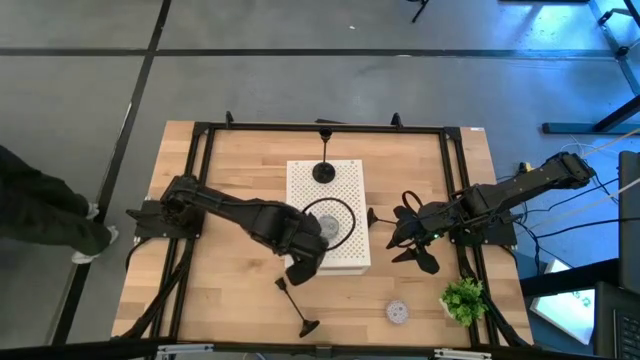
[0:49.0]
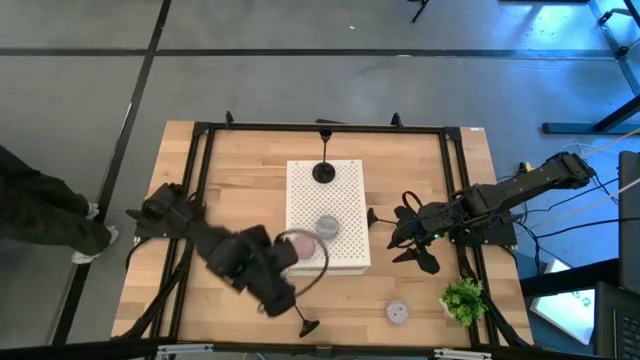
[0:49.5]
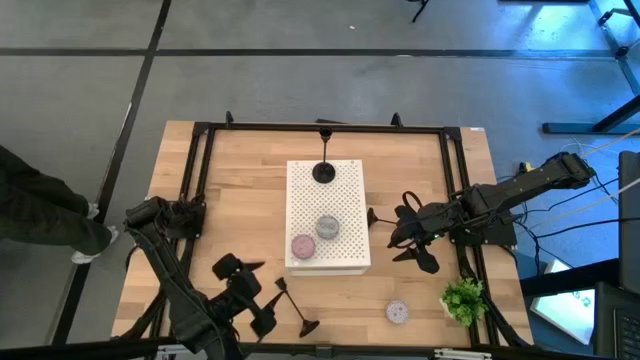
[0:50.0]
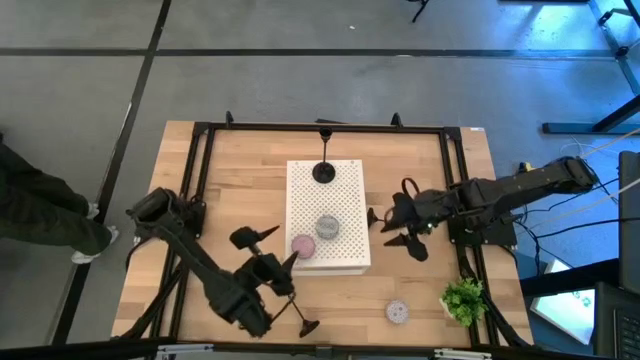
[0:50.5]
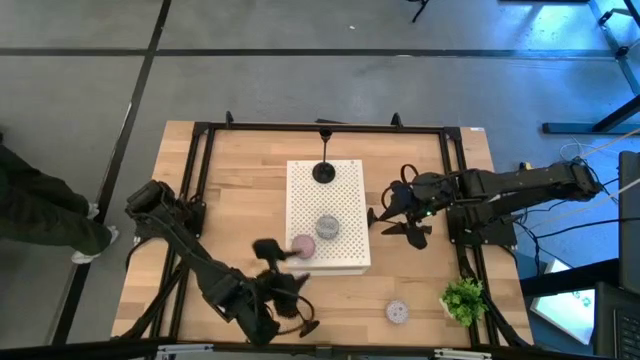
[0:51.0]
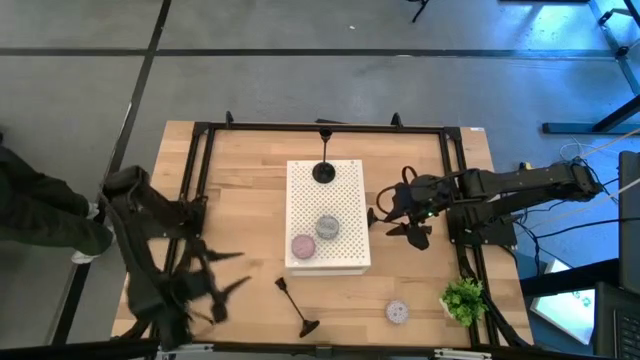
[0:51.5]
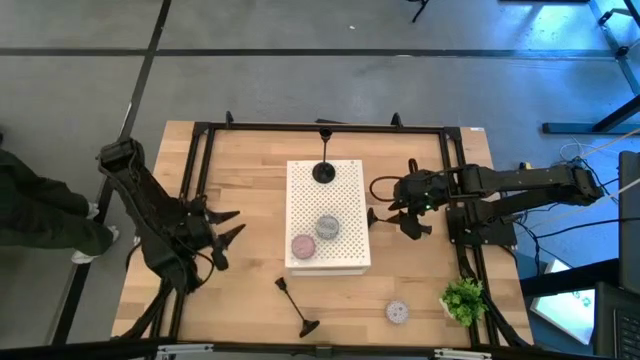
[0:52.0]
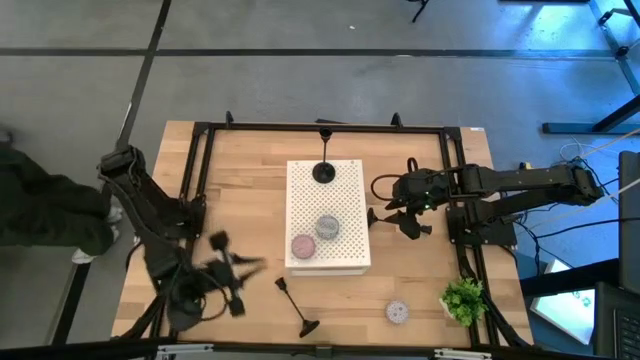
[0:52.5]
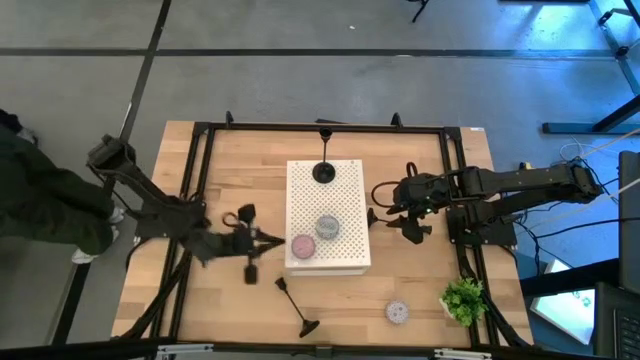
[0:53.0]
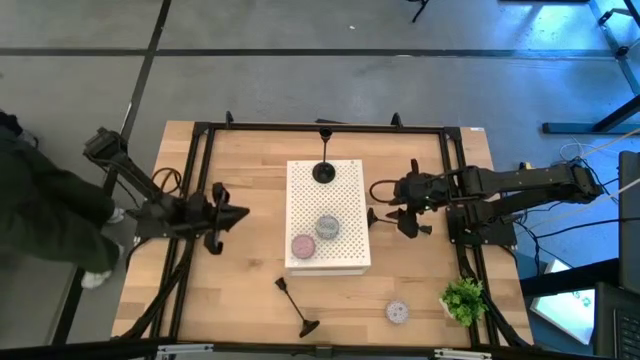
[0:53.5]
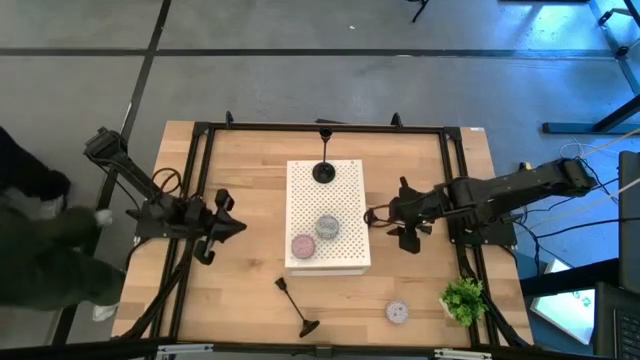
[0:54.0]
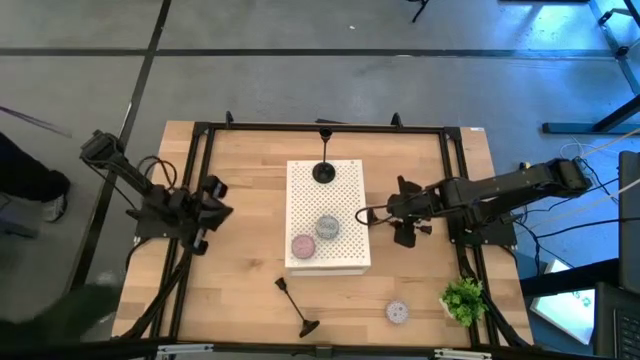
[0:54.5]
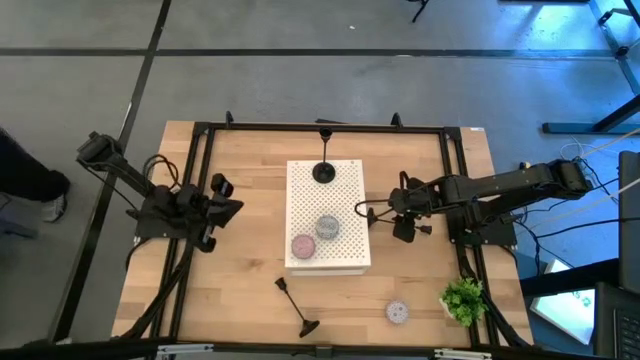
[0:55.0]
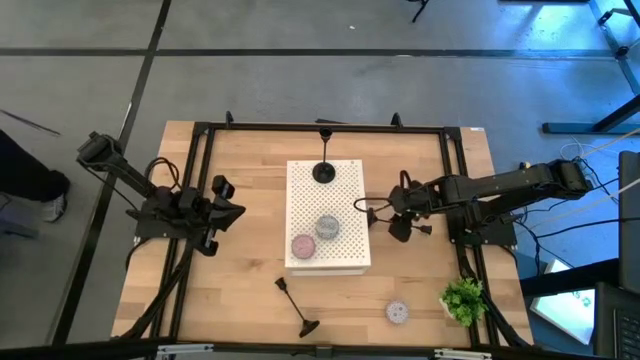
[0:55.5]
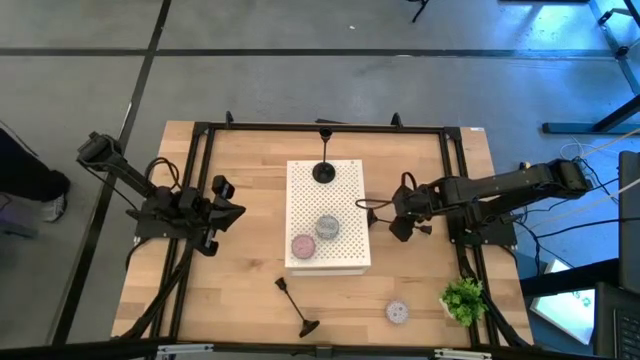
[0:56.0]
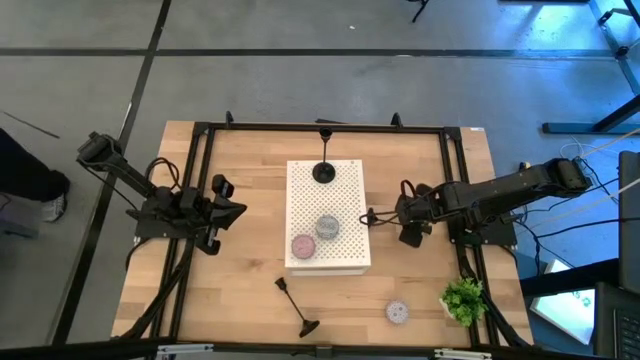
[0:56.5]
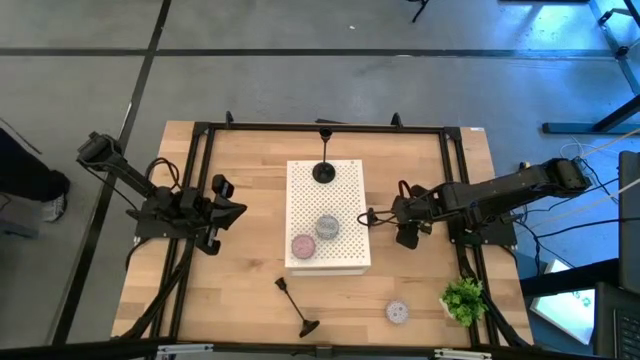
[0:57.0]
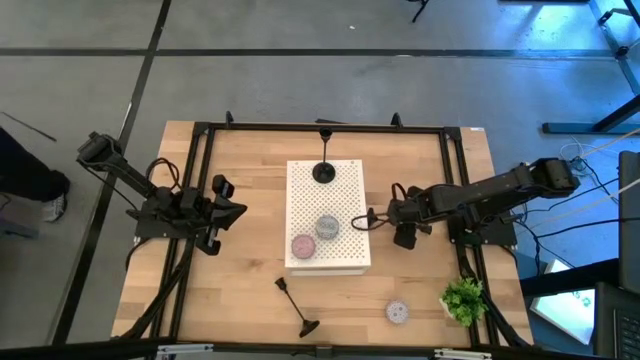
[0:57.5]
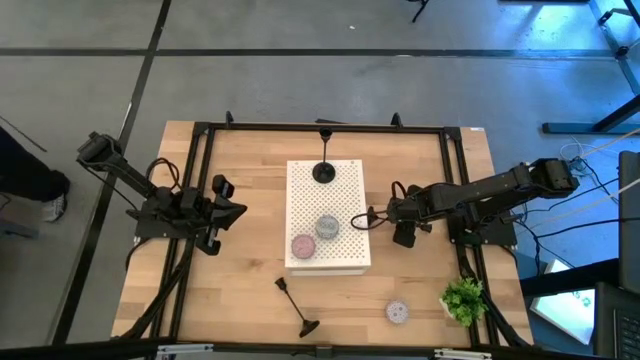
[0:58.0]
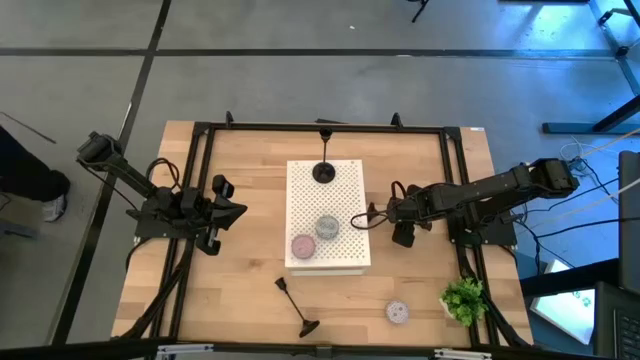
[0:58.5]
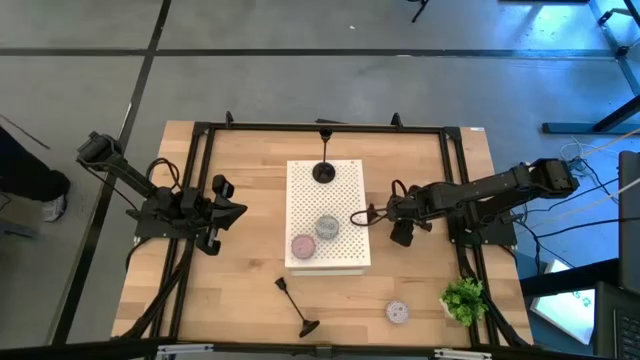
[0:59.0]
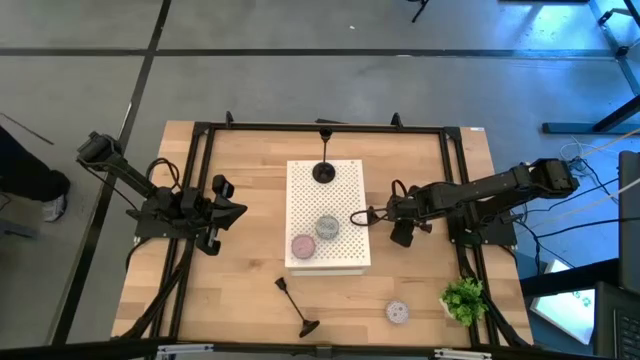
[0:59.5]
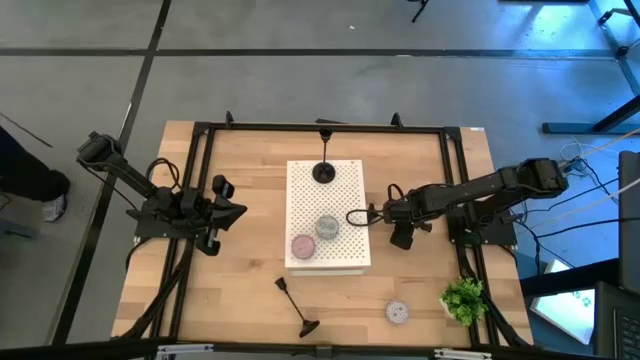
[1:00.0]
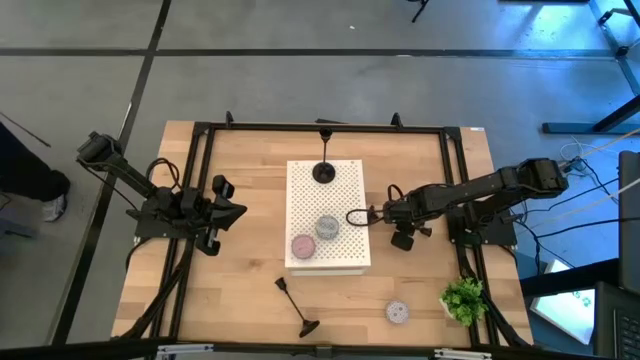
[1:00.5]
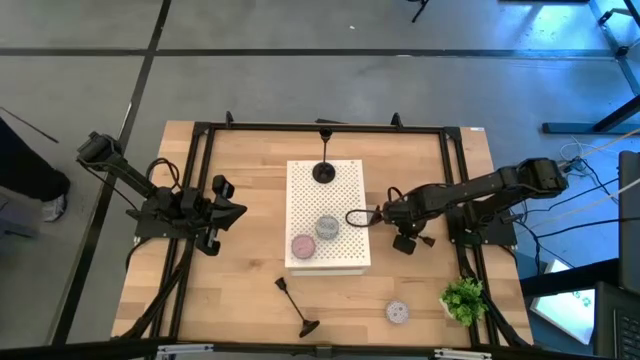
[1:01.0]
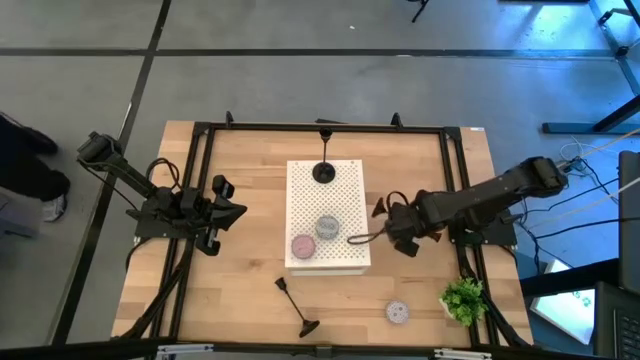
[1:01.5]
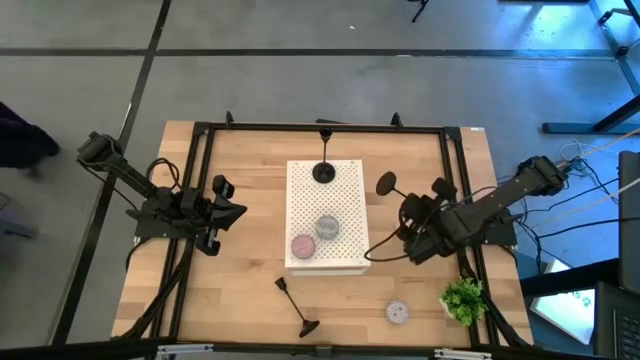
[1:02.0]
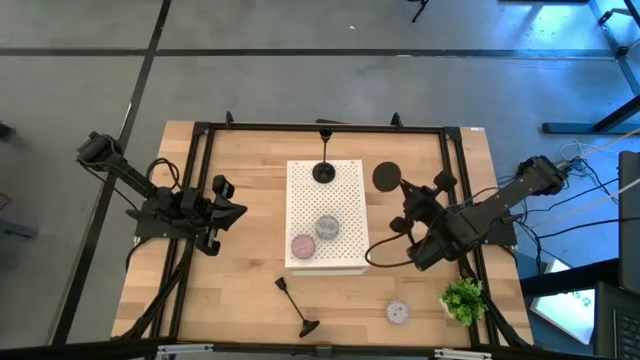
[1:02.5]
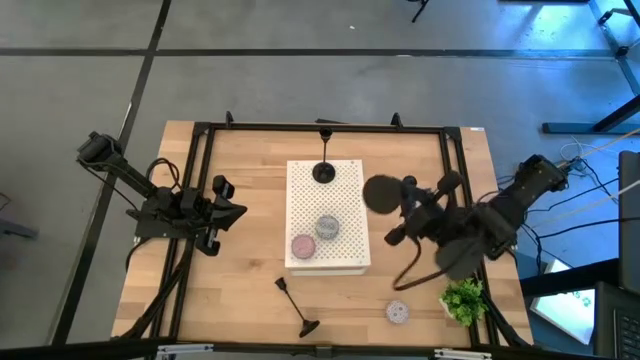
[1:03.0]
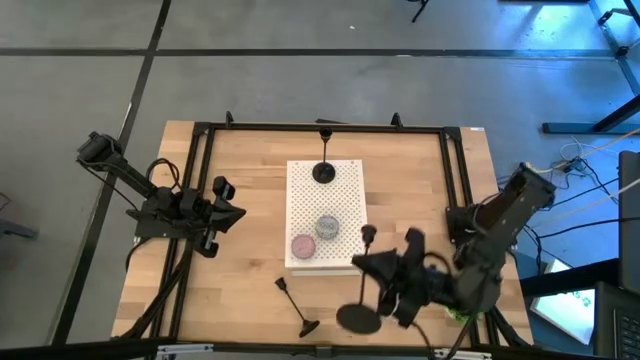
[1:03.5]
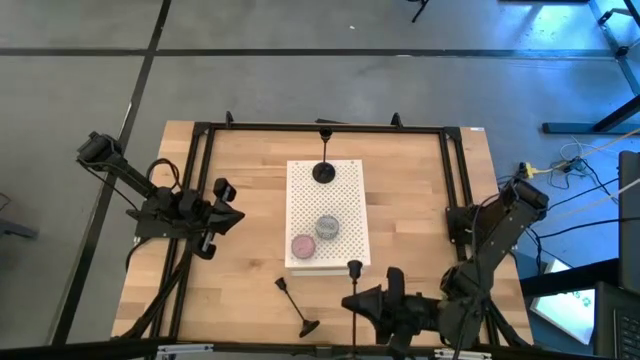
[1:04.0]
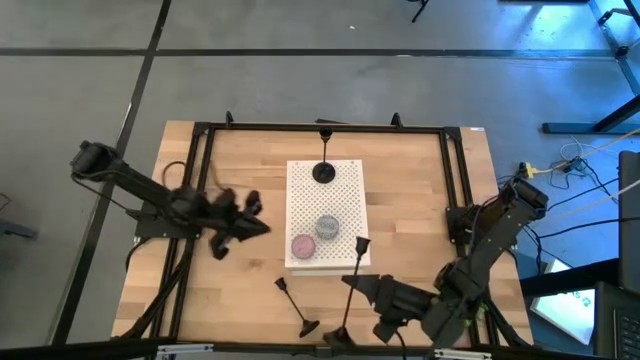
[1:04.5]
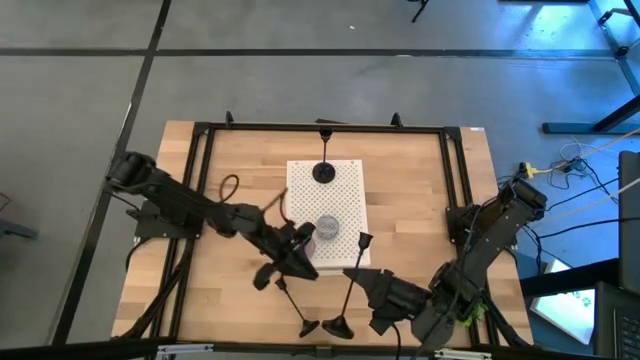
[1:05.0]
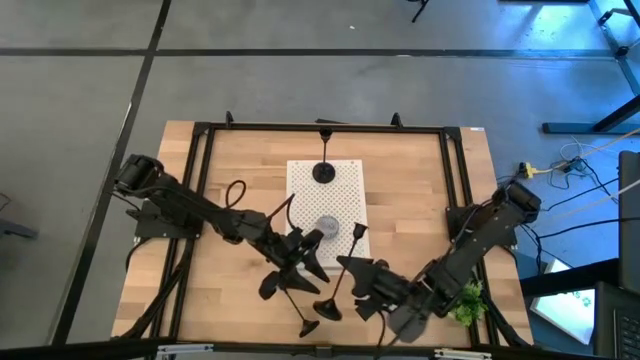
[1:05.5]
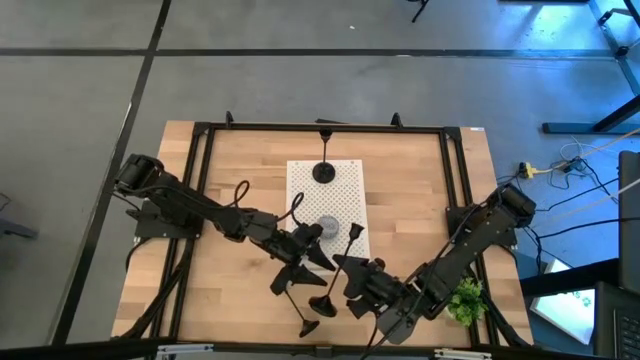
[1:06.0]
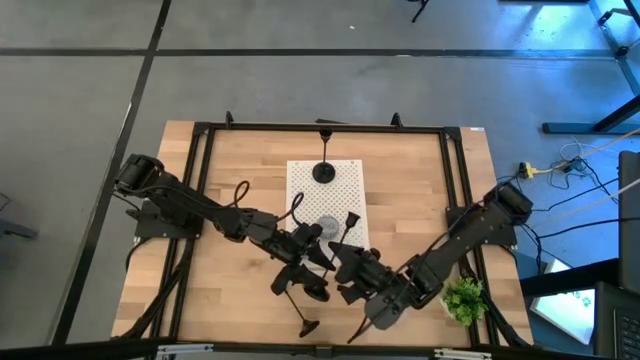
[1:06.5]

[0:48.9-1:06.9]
Task: Pick & Place candle stick holders
Put the top black candle holder on the shelf

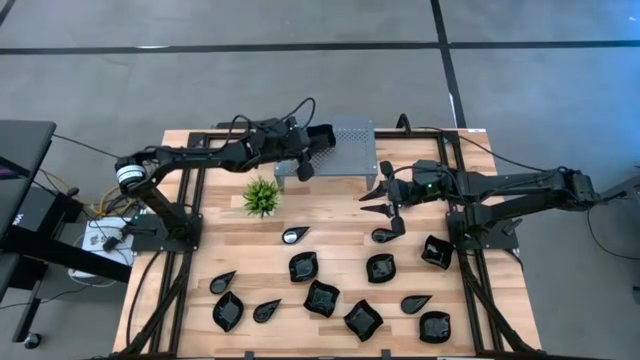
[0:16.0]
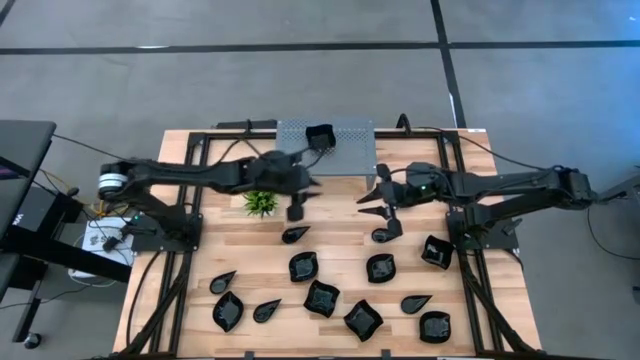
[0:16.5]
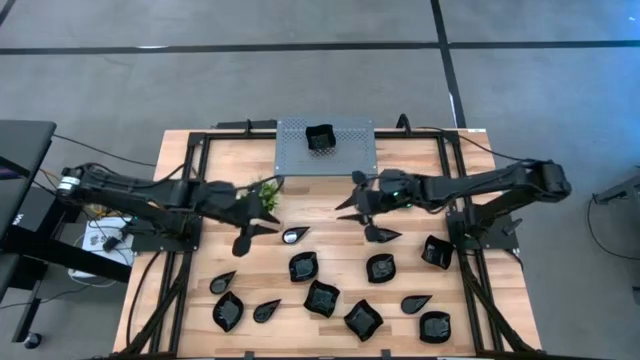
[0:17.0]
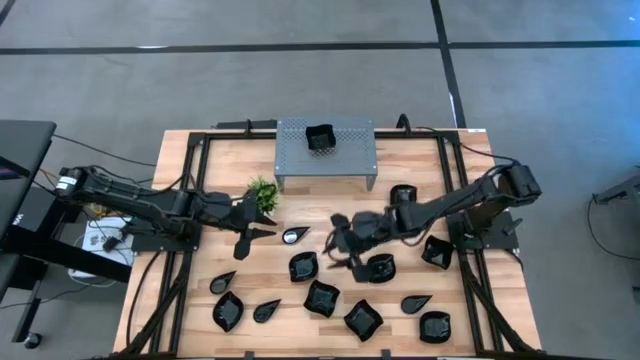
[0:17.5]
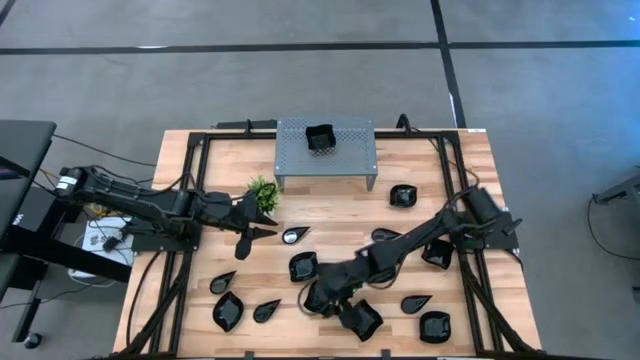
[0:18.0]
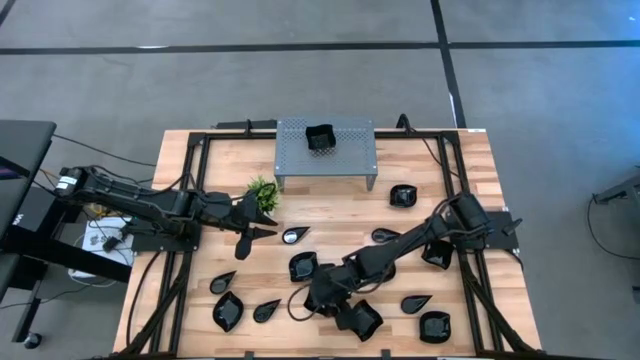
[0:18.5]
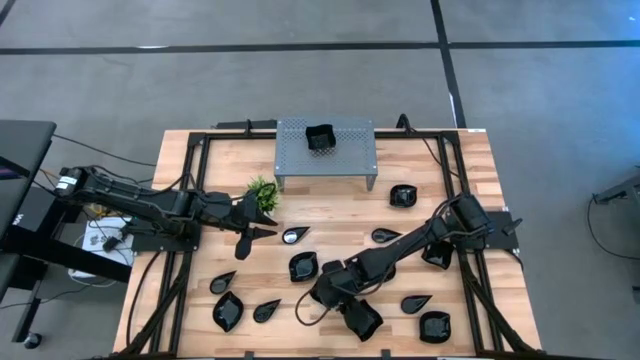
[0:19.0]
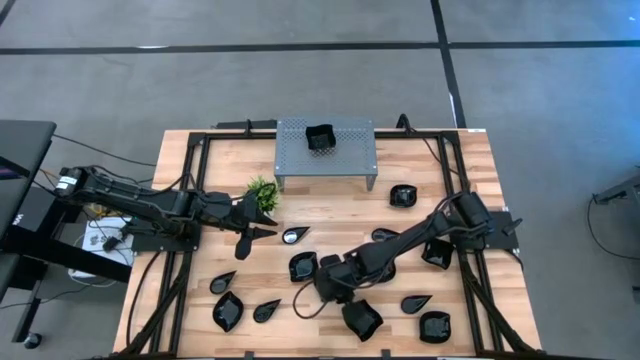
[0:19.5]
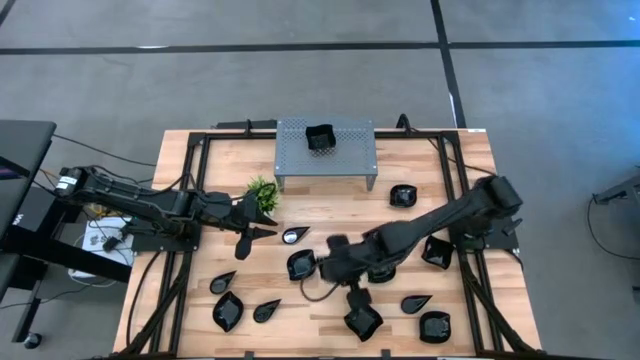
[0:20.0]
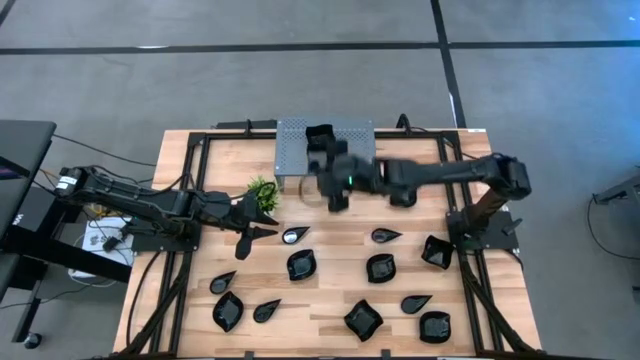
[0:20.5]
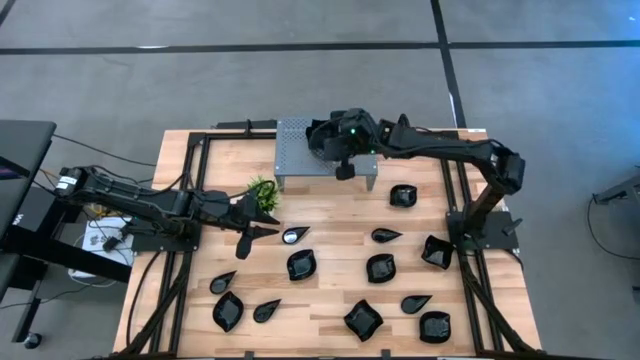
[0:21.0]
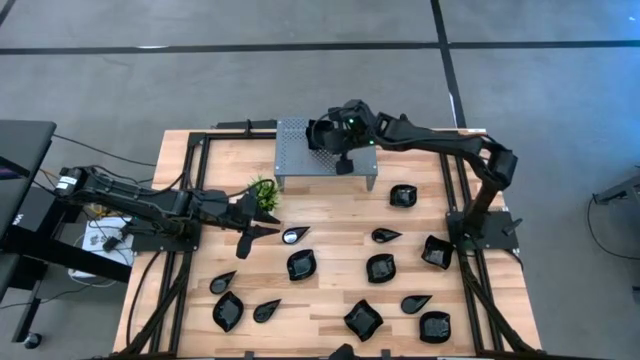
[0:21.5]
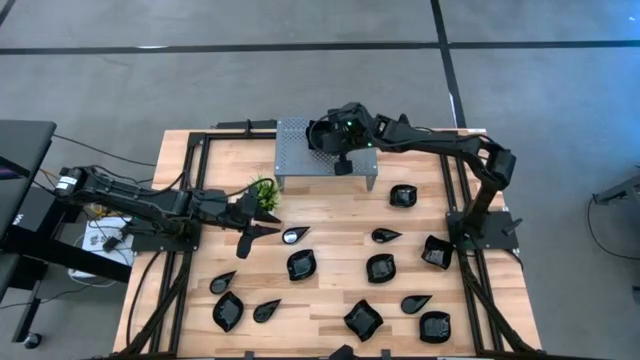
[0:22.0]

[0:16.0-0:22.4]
Task: Pick & Place Mini shaped plates
Stack the black distorted square plate on top of the black distorted square plate on the shelf
